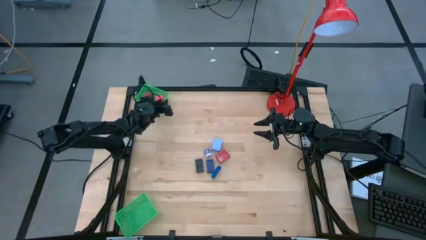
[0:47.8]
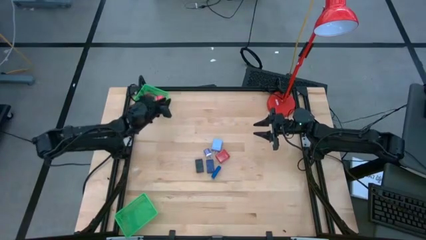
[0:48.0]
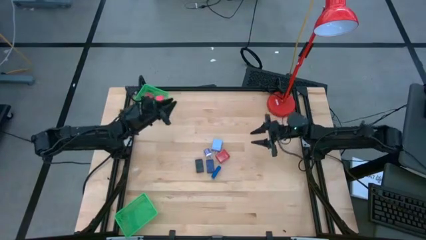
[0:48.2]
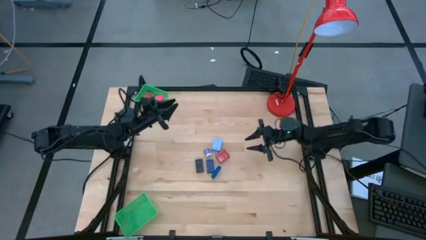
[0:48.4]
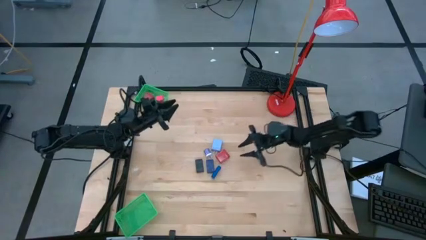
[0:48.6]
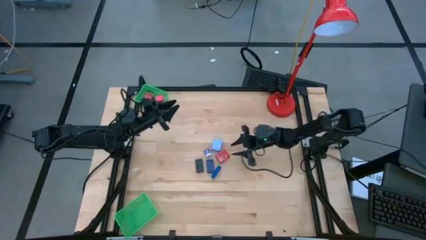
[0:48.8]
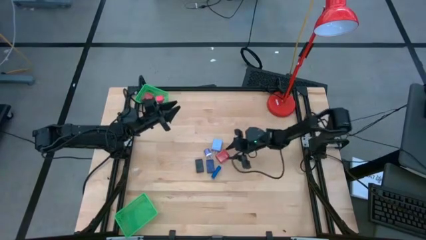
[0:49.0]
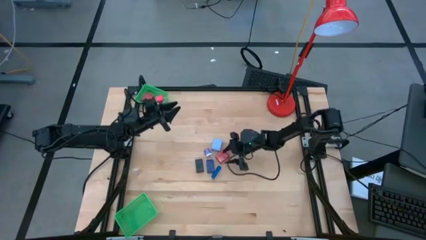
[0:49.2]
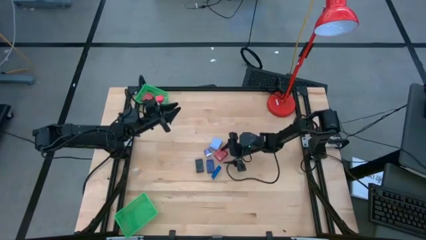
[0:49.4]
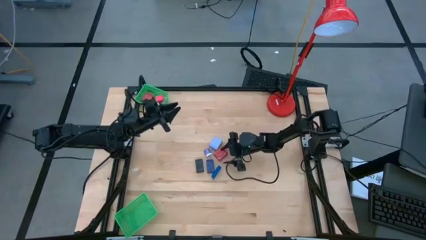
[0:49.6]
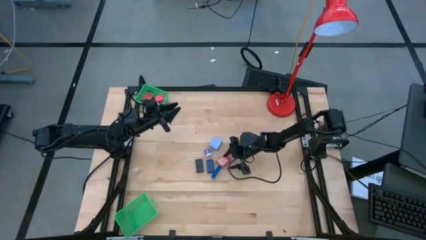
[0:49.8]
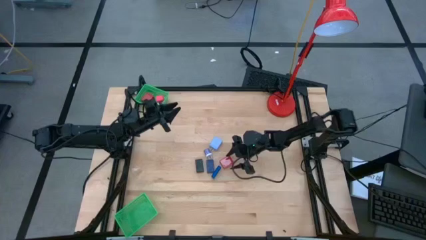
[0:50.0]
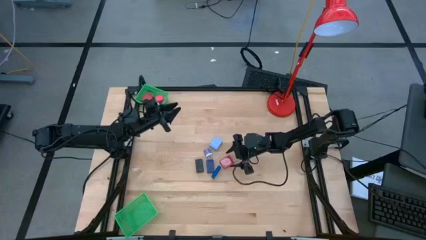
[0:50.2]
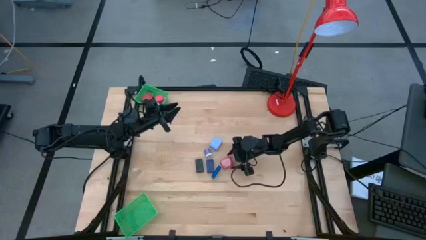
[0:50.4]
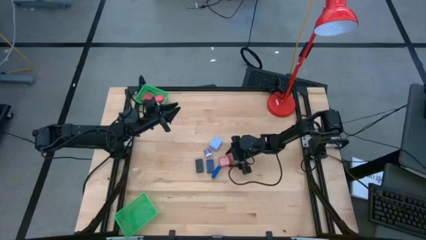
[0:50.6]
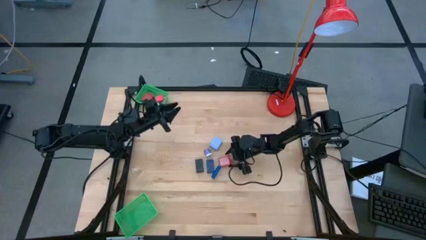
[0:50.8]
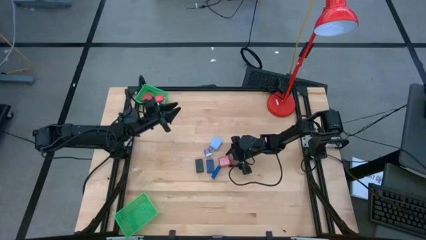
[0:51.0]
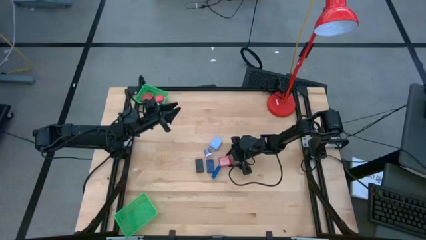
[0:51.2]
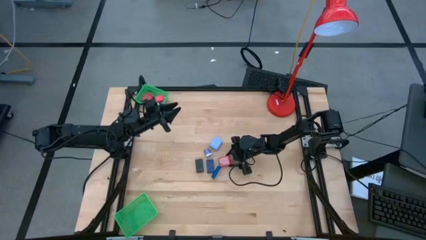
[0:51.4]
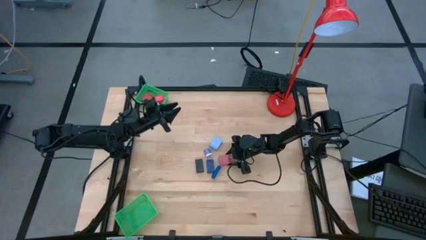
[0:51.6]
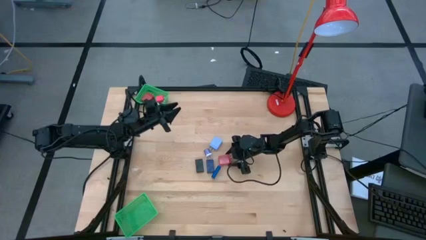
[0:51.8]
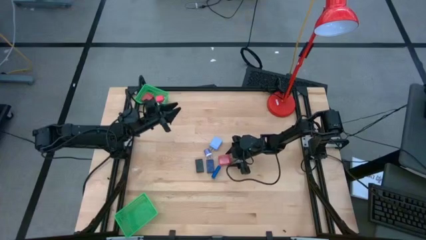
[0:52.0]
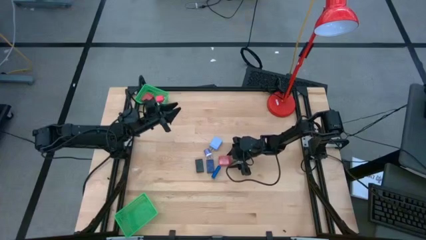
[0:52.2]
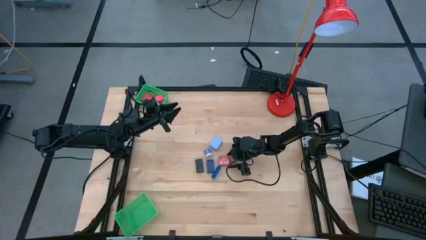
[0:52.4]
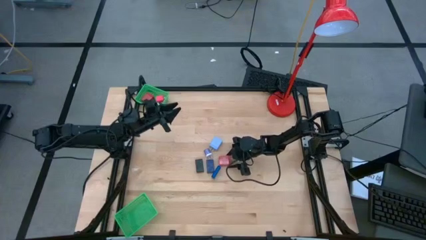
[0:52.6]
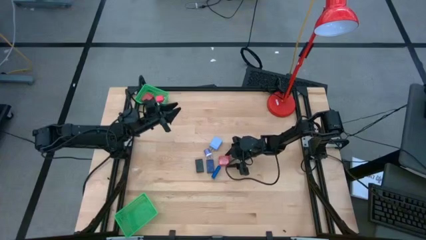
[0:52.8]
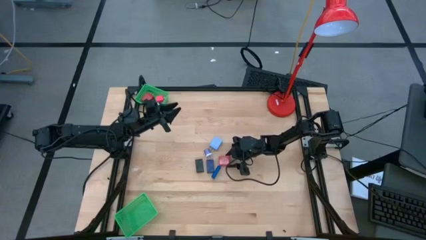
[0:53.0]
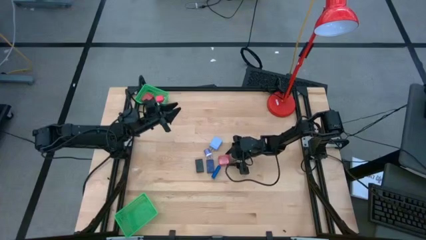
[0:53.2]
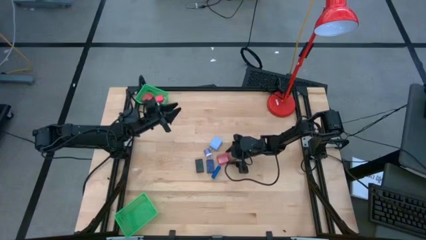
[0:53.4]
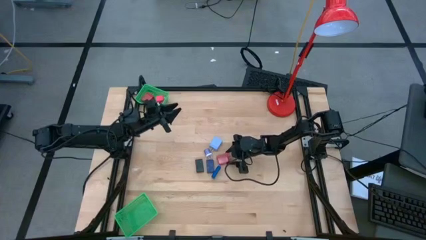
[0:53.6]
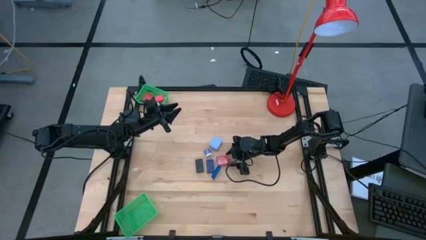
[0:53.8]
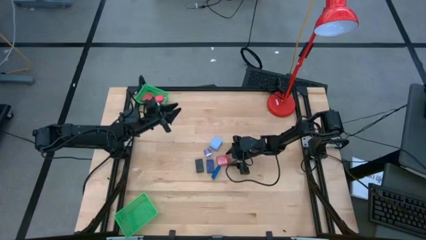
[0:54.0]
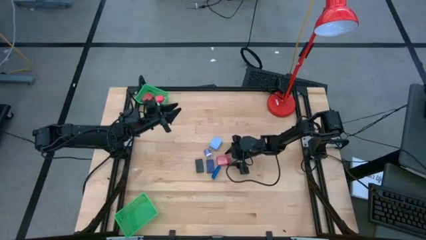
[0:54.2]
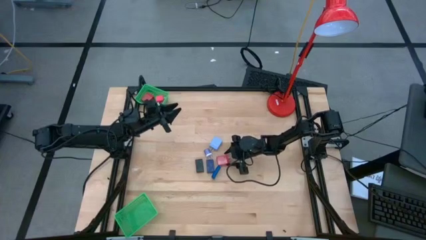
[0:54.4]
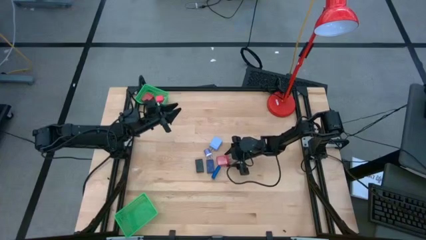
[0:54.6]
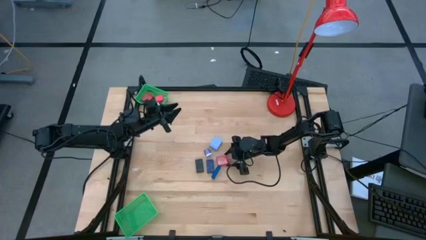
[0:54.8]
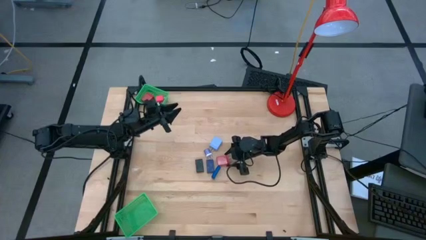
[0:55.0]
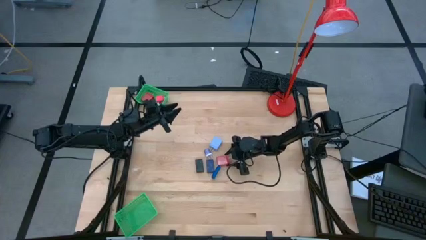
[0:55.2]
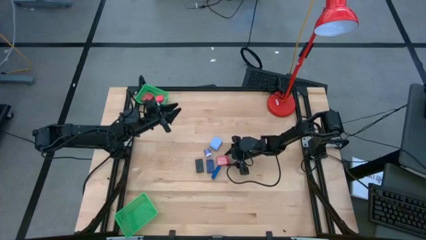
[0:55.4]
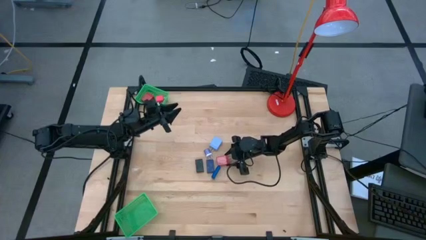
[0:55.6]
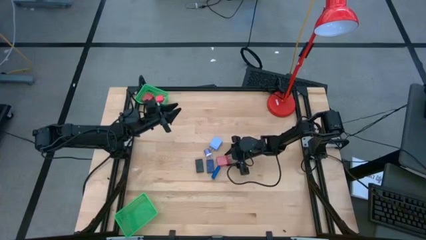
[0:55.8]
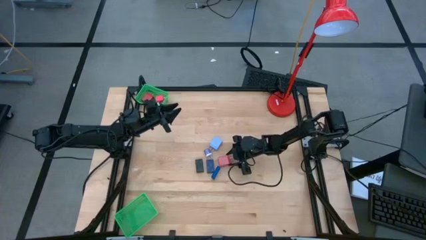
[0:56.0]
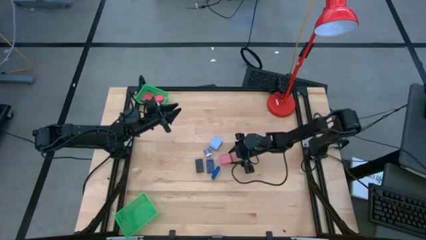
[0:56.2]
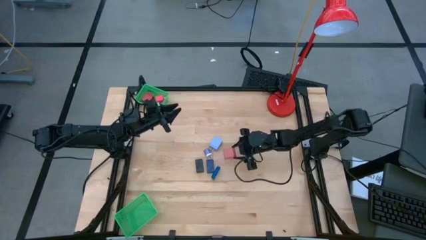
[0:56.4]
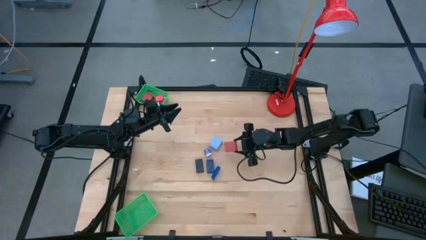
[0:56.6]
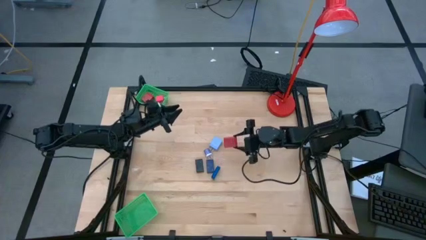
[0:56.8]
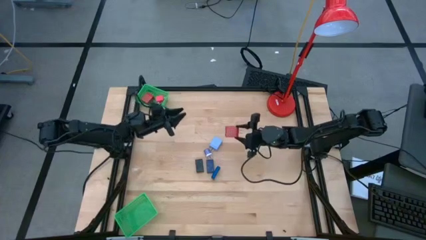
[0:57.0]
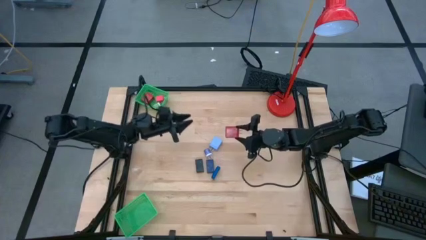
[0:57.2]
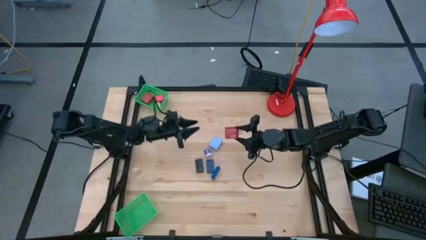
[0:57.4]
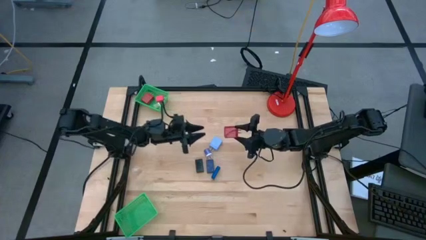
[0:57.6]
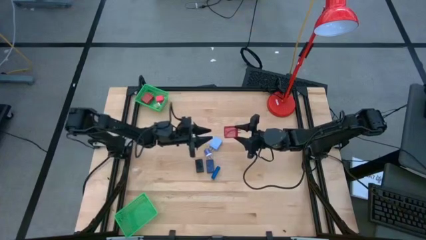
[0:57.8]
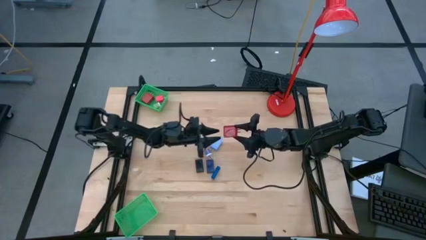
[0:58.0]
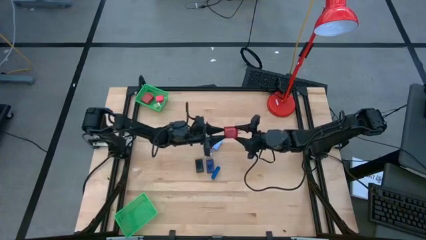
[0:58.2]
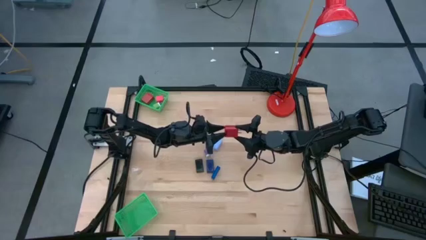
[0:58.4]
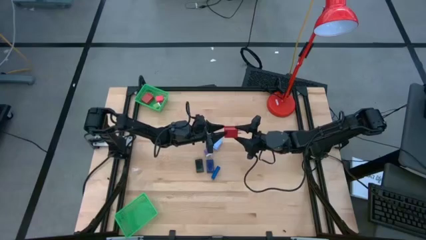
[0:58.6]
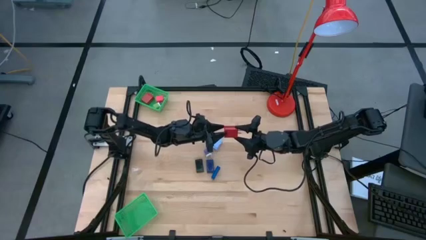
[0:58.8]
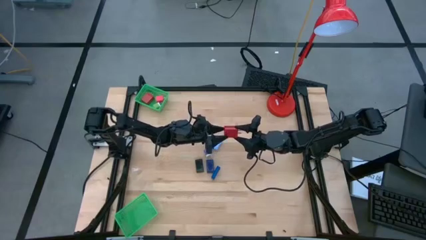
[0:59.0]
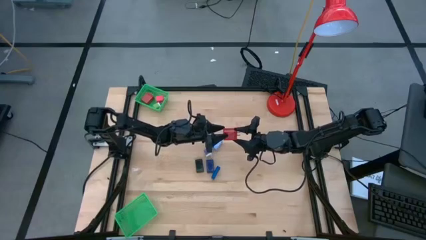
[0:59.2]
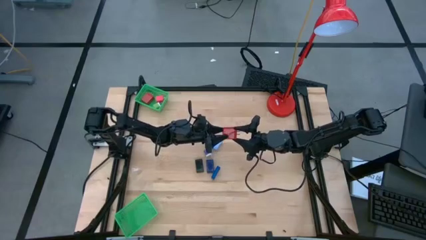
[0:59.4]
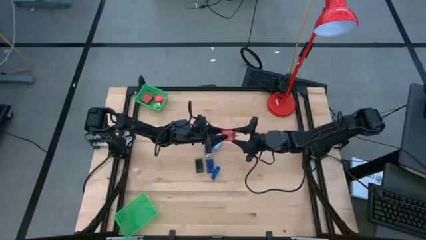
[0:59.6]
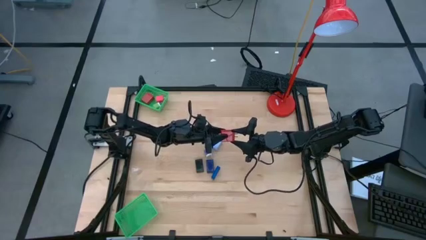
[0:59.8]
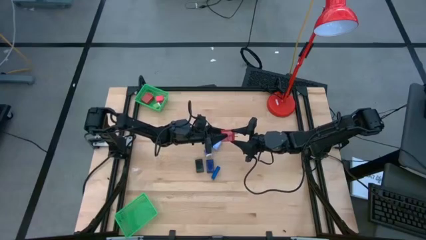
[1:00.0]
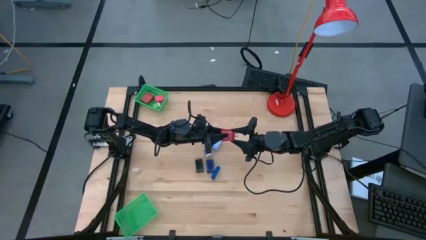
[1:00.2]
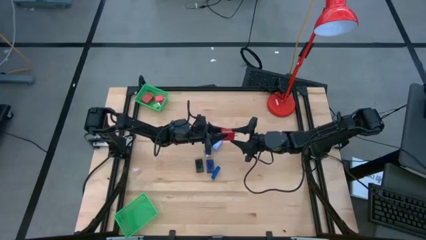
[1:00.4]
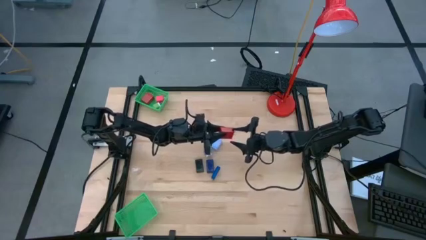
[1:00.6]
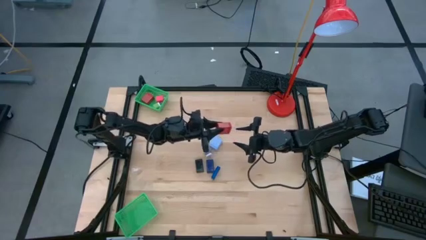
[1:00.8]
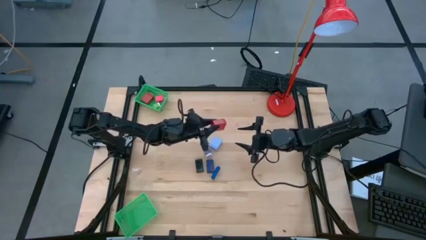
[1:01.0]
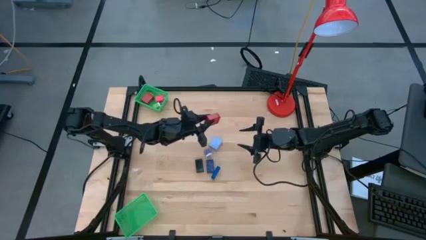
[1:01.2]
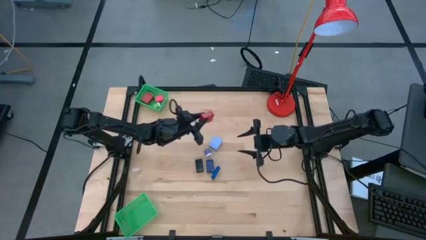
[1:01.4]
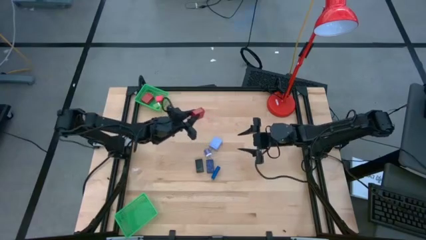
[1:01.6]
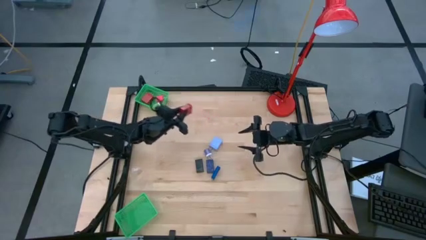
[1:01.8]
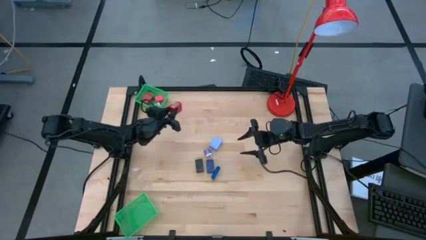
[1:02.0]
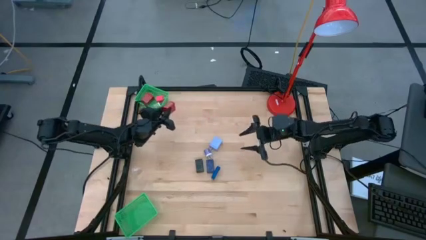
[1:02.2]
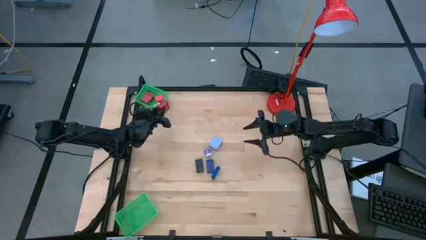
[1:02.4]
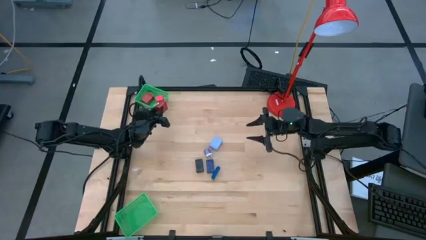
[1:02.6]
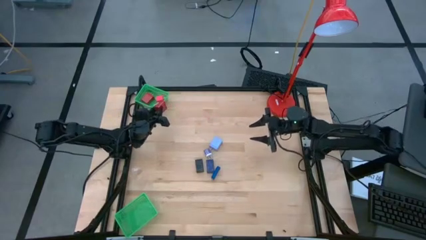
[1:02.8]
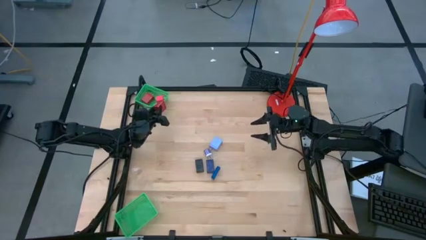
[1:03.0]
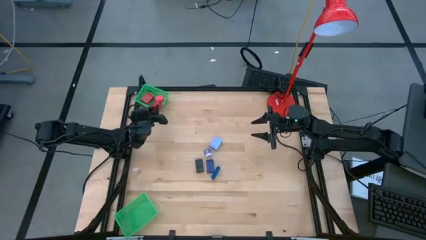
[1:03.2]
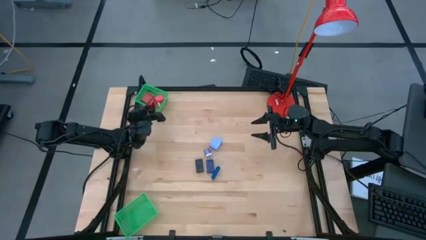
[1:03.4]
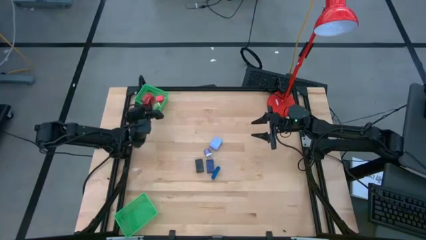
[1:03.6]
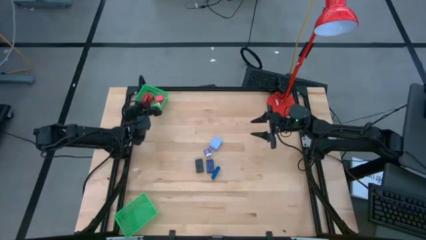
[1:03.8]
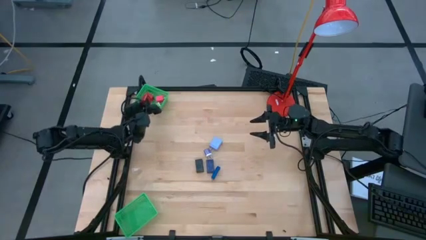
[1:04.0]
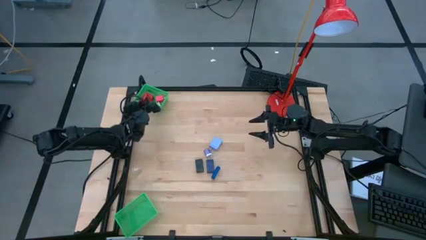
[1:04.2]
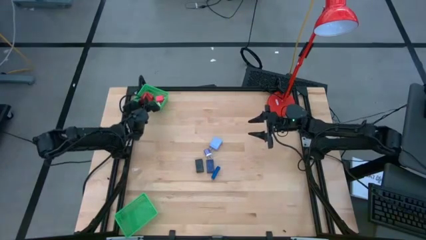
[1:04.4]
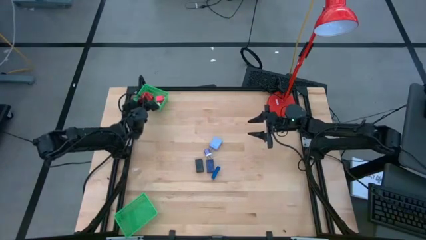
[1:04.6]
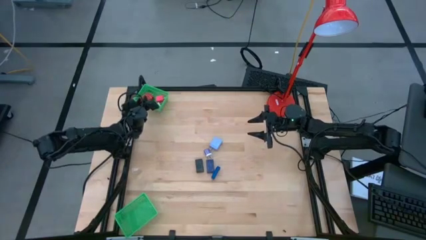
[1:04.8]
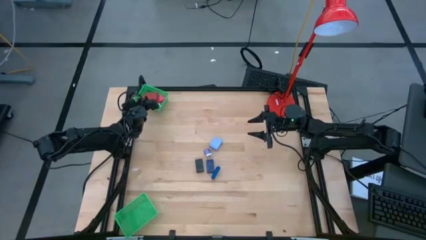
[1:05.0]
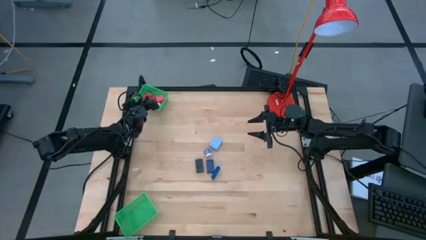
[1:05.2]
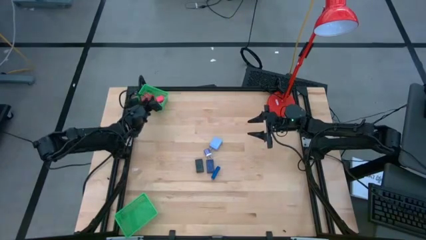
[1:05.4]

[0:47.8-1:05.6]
Task: Pick & Place Office items
Put the red charger adapter into the top green basket
